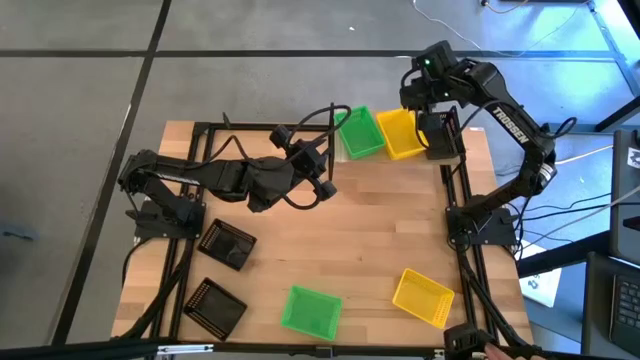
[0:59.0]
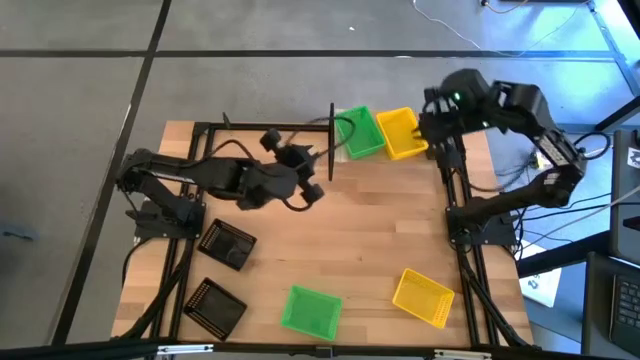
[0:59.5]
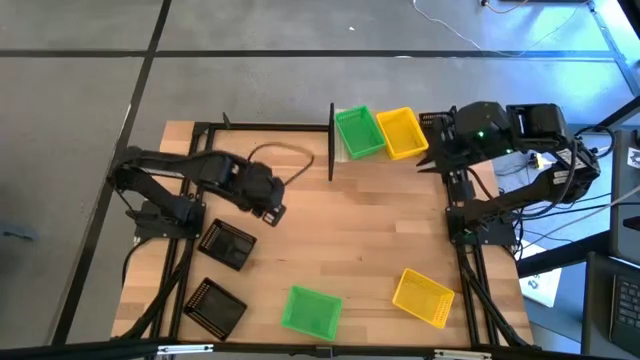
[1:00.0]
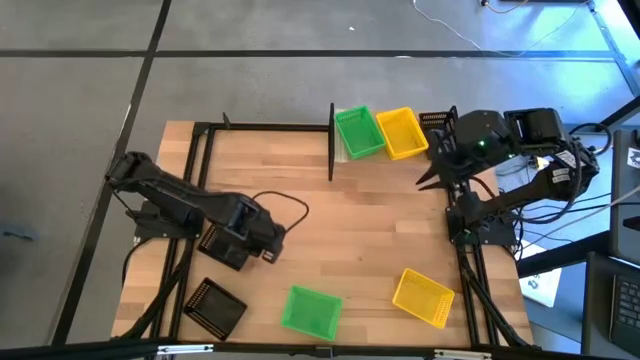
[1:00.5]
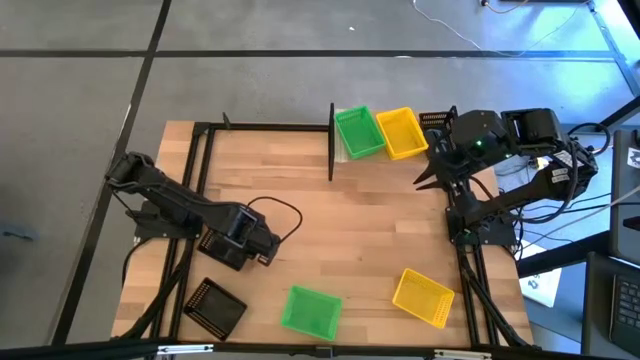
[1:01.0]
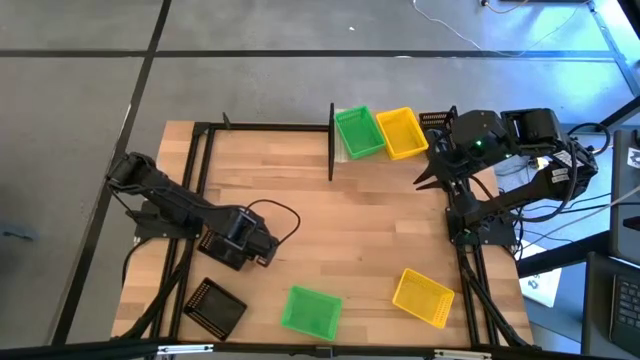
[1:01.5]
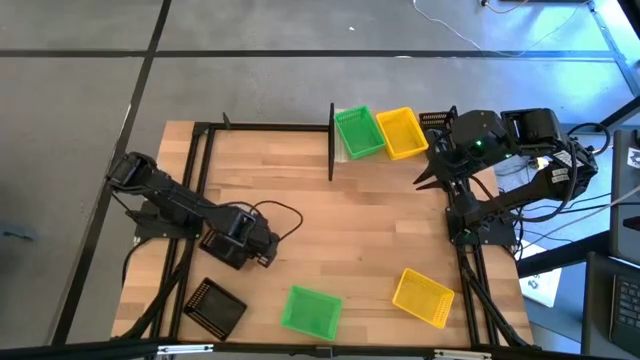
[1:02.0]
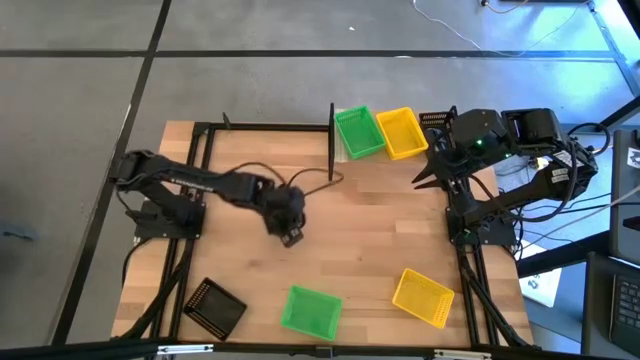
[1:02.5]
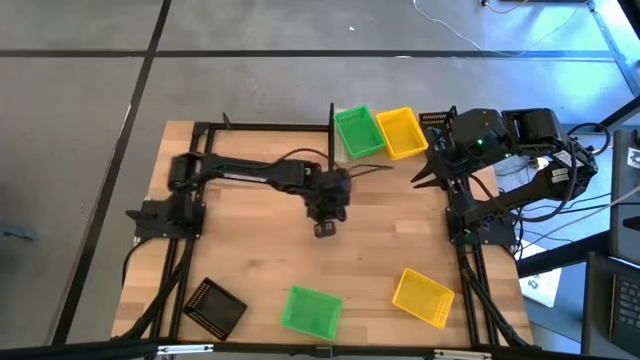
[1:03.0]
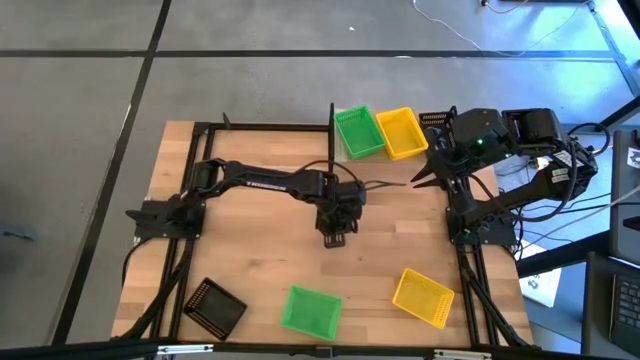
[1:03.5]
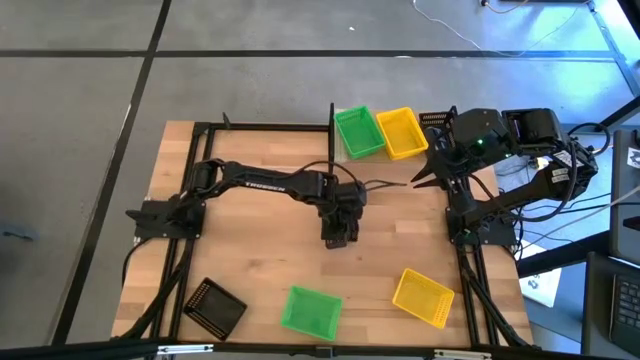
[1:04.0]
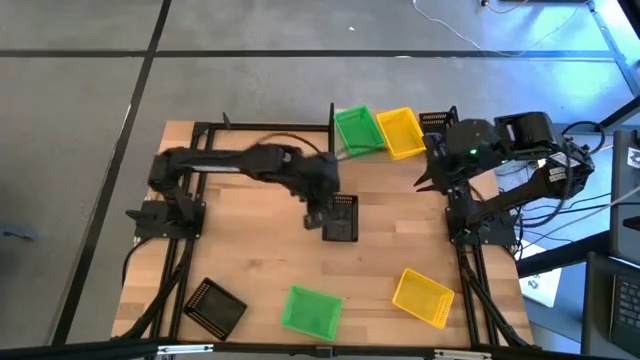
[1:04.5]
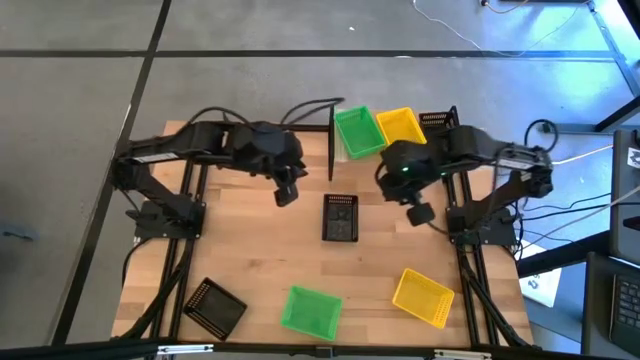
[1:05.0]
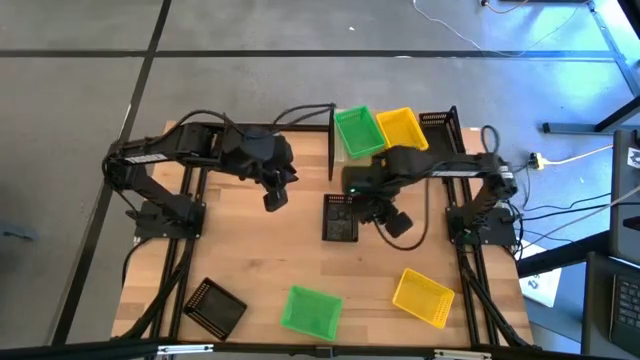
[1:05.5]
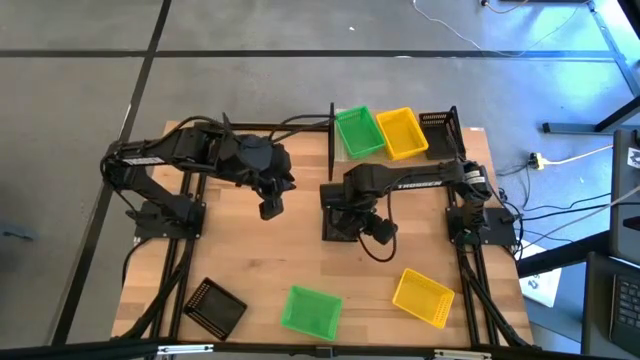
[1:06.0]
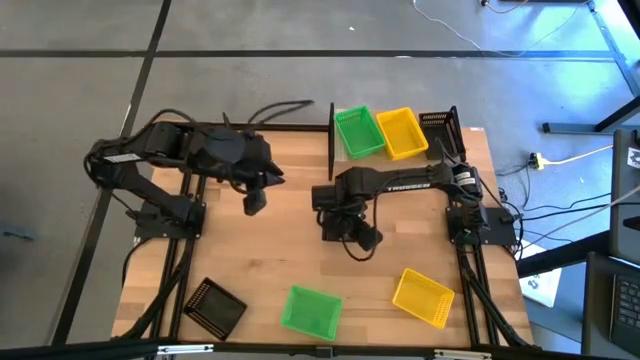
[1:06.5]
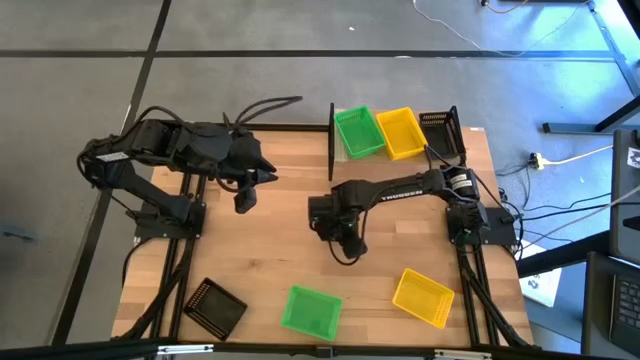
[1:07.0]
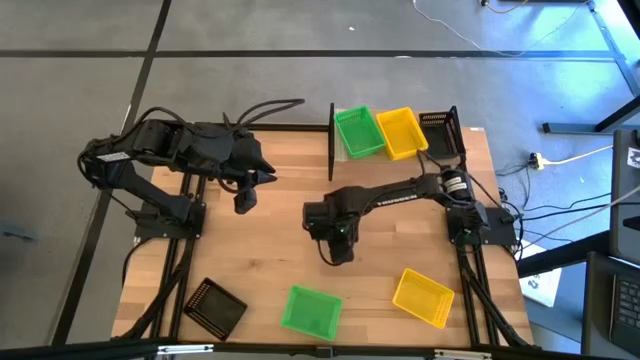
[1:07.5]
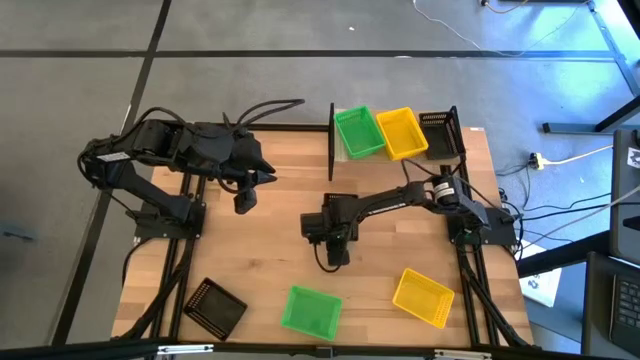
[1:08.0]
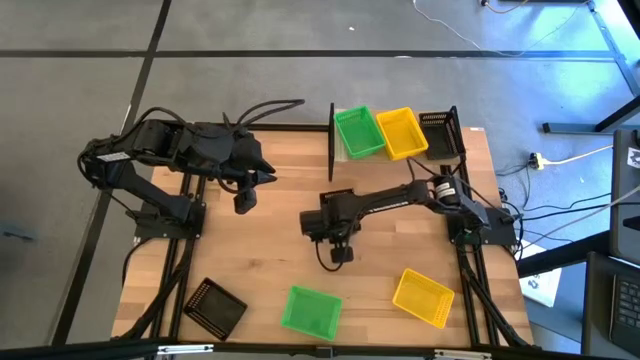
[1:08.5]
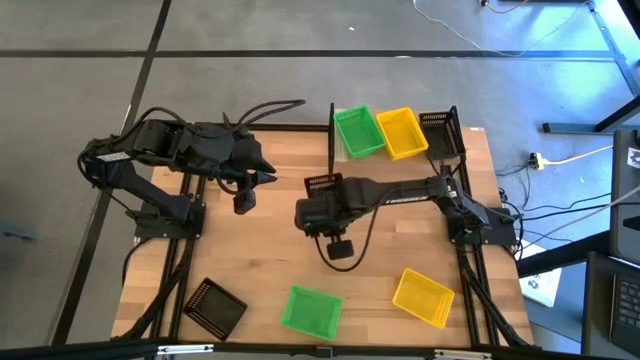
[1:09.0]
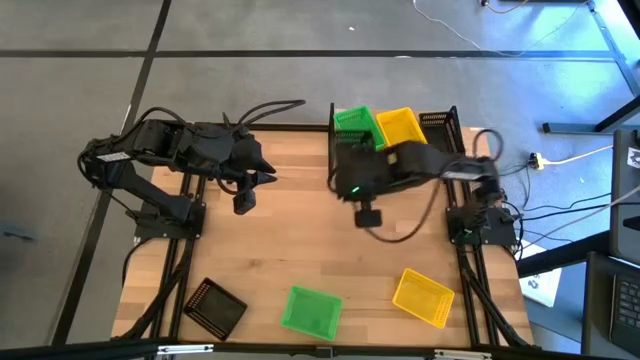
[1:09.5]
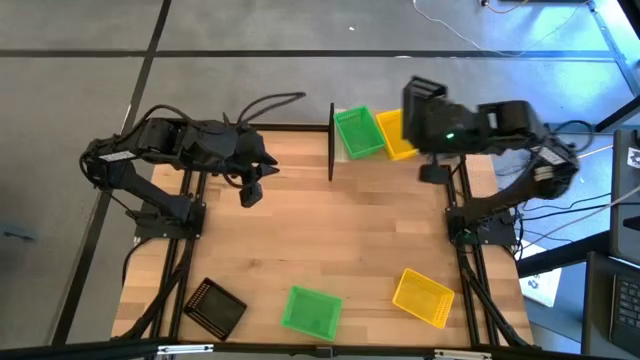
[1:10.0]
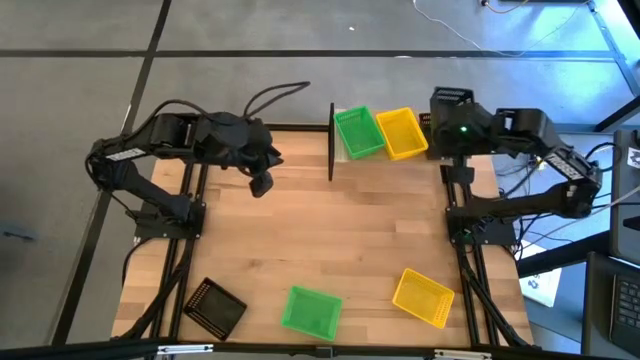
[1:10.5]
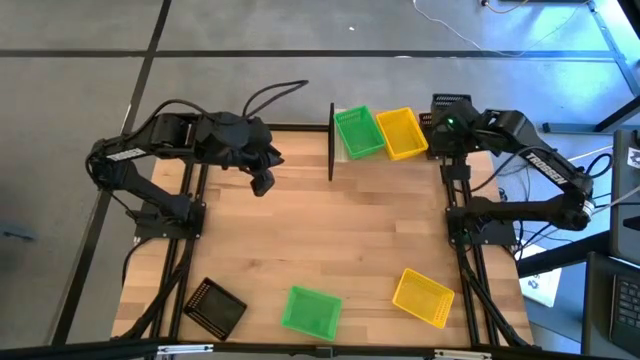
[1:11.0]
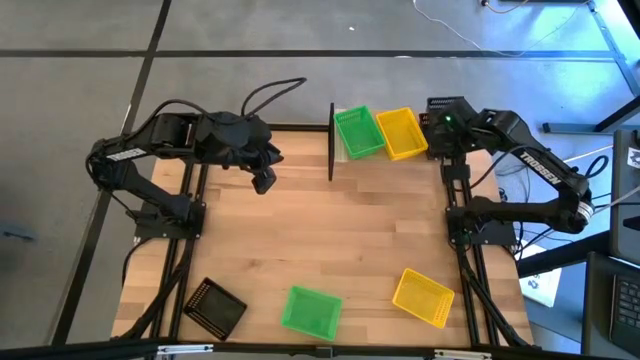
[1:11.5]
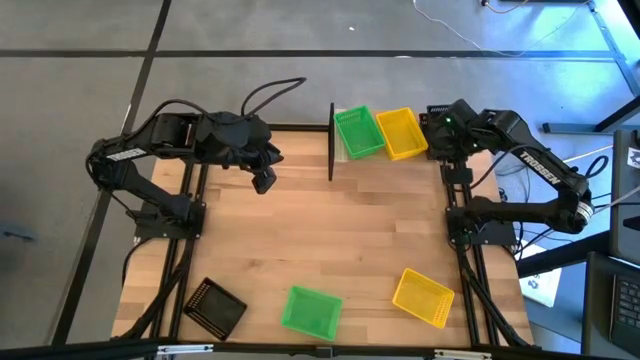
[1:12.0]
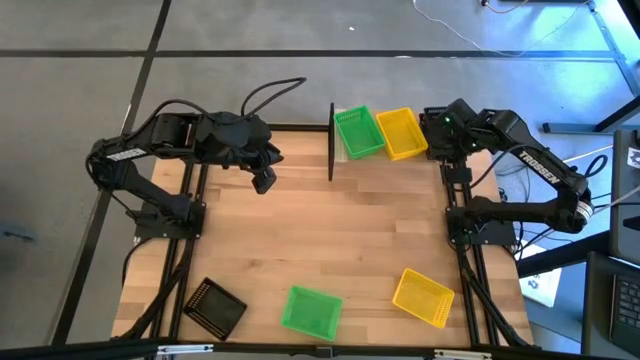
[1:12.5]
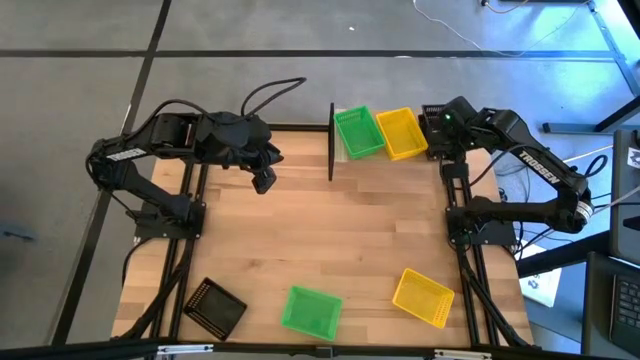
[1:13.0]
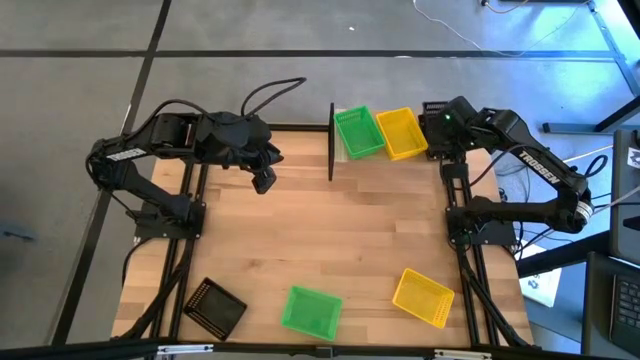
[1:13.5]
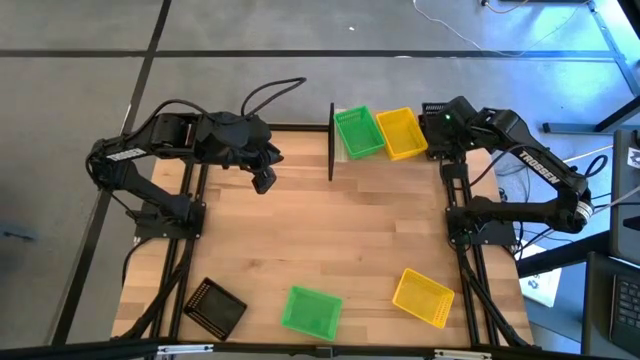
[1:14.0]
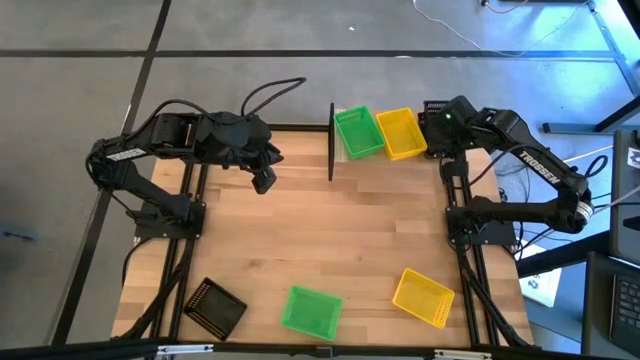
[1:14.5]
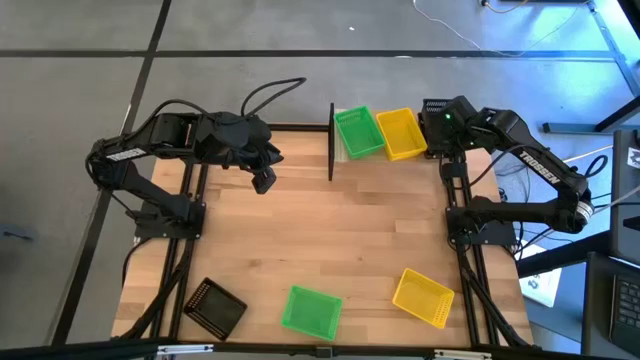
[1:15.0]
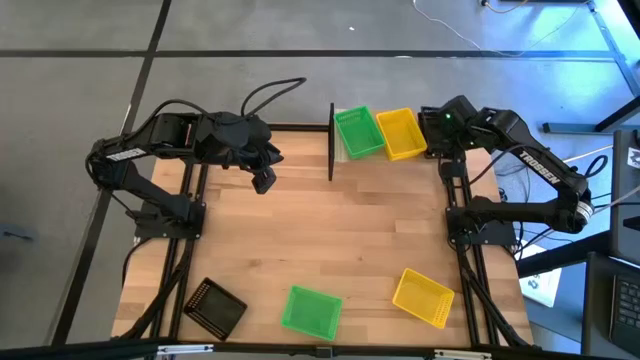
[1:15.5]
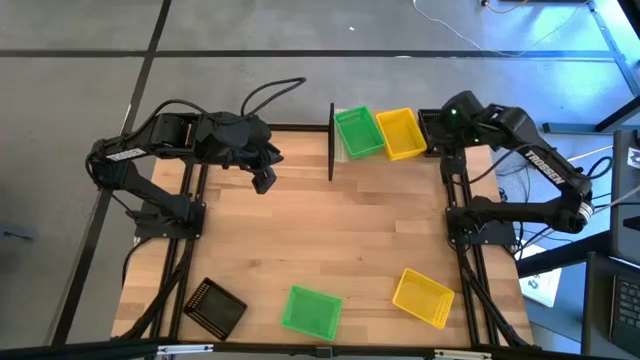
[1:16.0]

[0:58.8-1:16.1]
Task: Stack baskets on shelf by color
Stack the top black bin on the black bin on the shelf

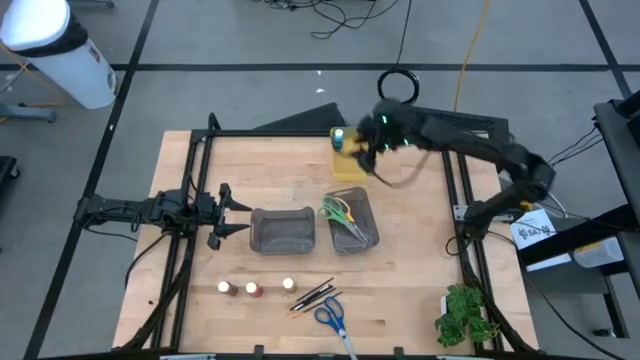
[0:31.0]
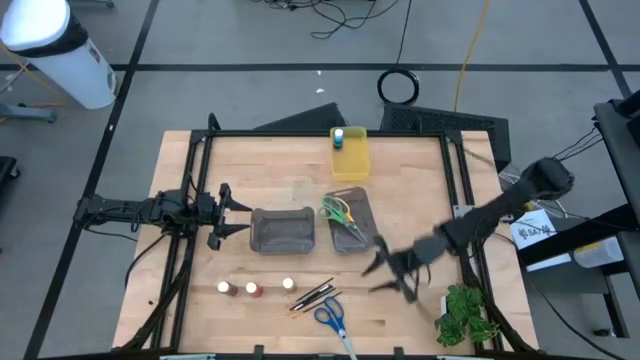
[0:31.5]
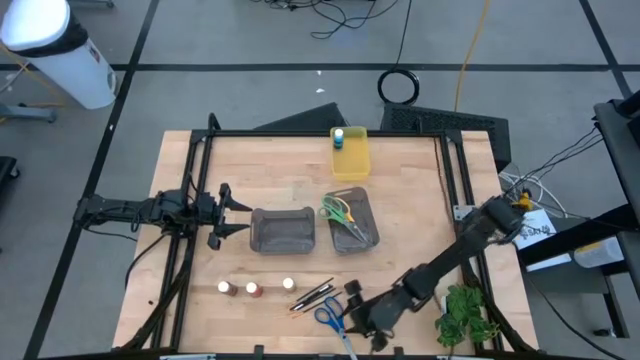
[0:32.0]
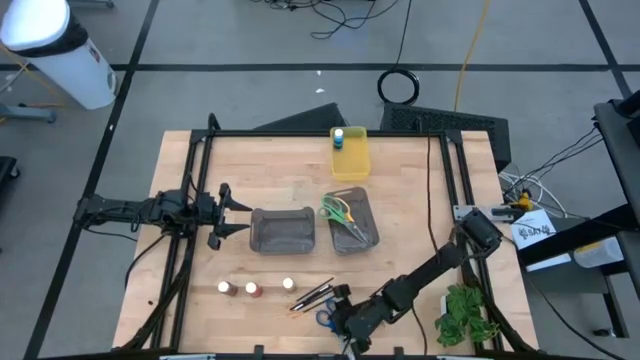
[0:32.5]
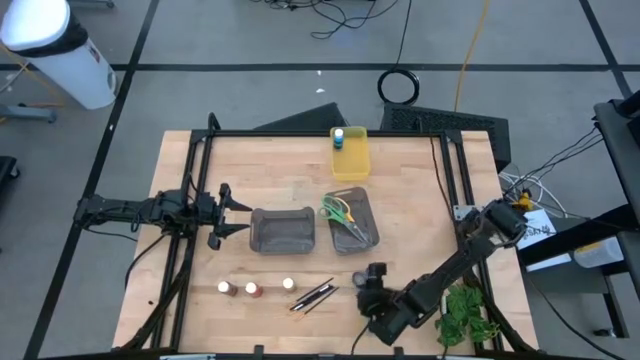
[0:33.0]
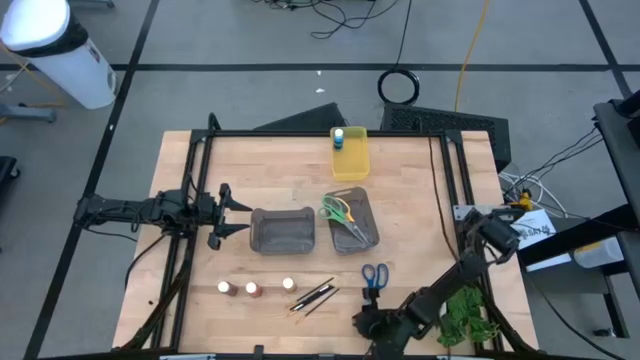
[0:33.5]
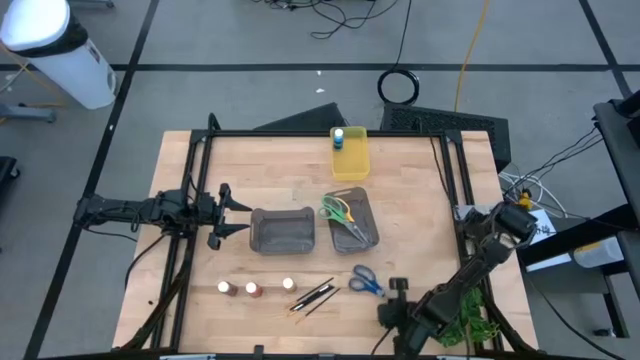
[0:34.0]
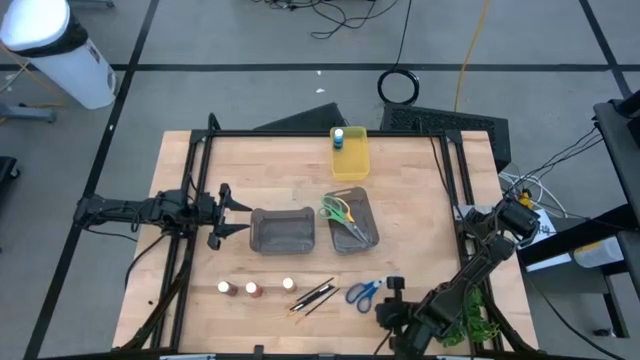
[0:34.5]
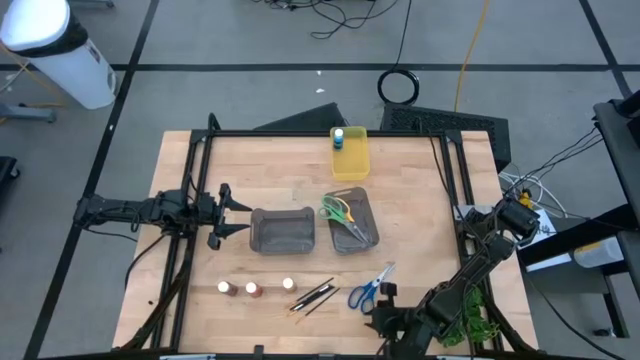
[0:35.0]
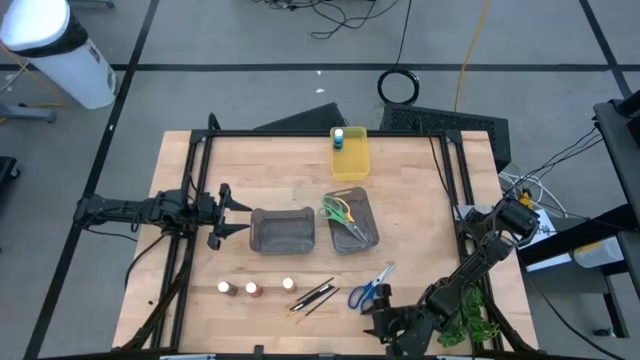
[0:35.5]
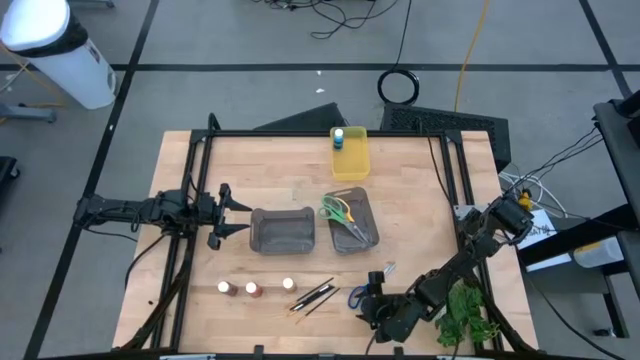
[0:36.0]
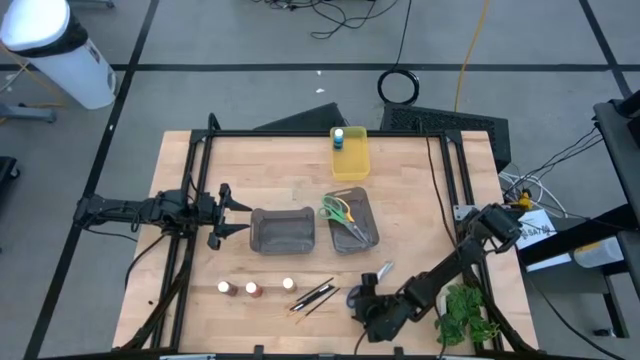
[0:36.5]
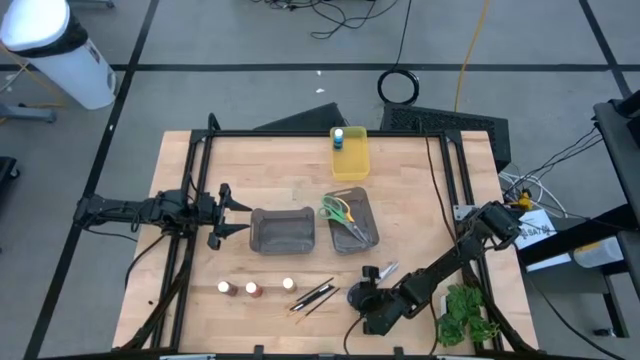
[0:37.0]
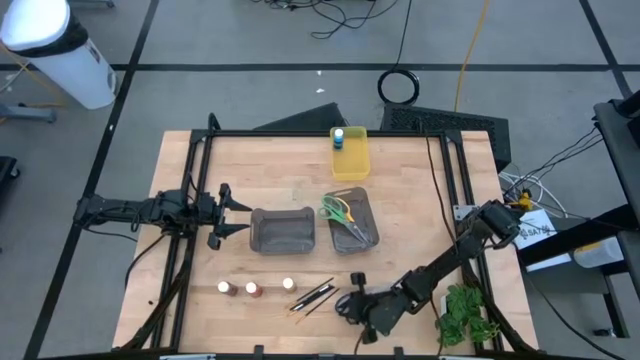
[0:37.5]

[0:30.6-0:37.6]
Task: Pick & Place Paint Supplies
Put the blue scissors into the right bin
